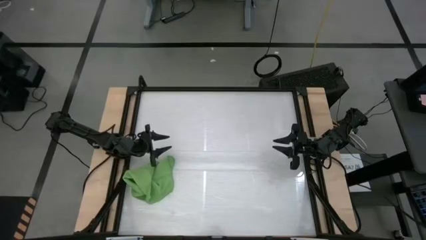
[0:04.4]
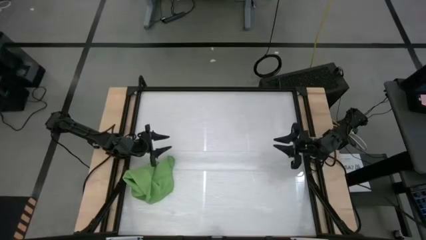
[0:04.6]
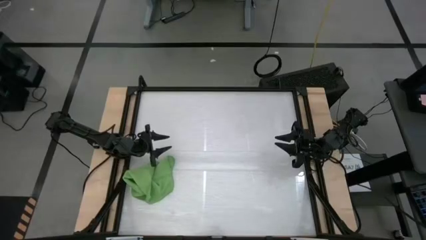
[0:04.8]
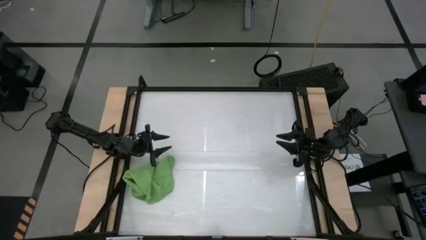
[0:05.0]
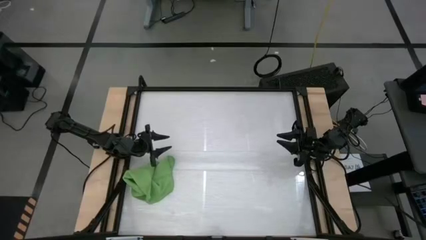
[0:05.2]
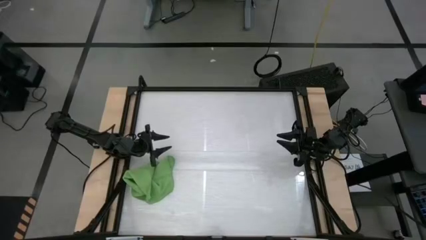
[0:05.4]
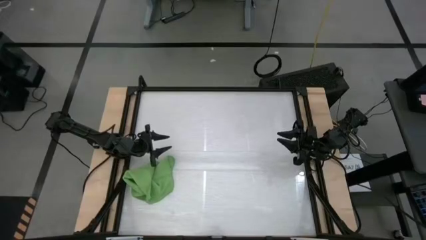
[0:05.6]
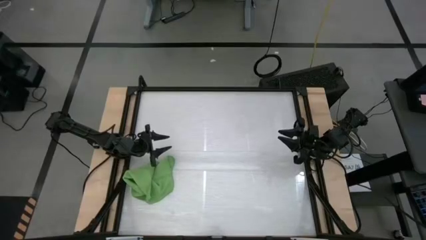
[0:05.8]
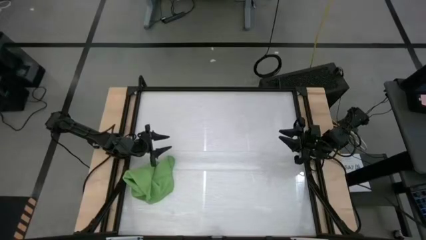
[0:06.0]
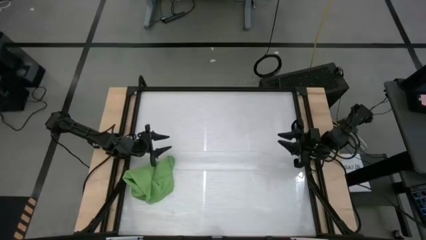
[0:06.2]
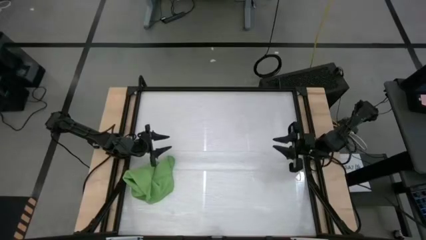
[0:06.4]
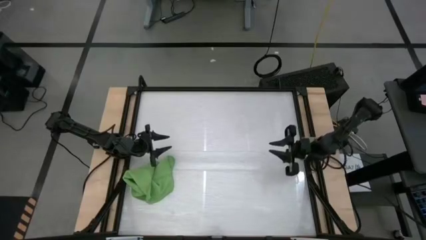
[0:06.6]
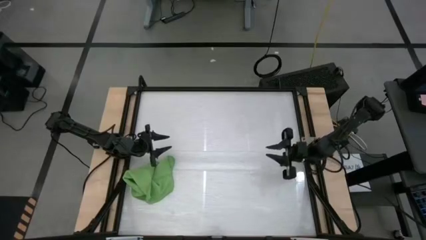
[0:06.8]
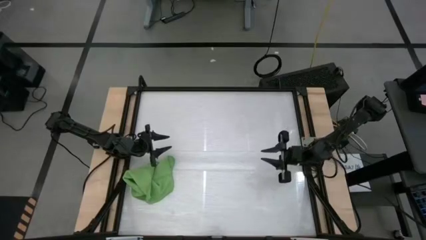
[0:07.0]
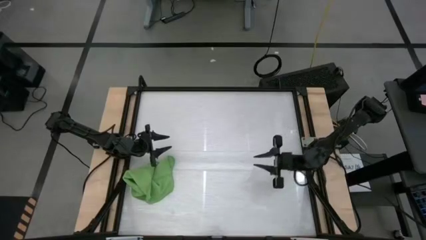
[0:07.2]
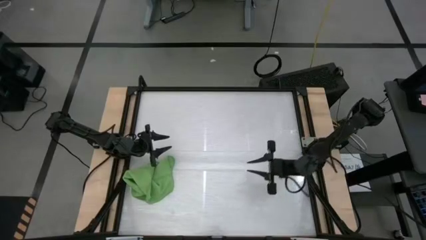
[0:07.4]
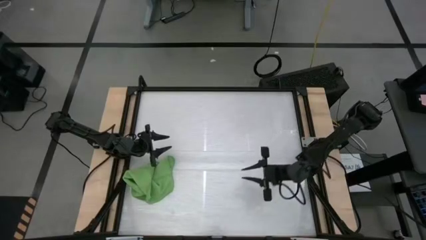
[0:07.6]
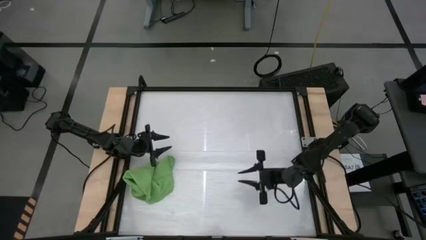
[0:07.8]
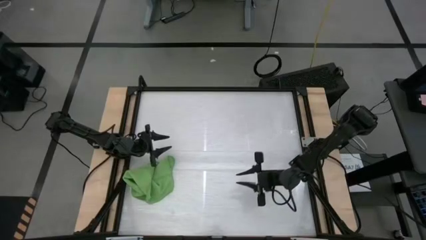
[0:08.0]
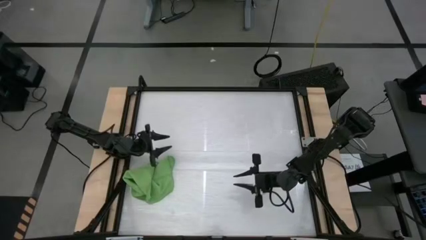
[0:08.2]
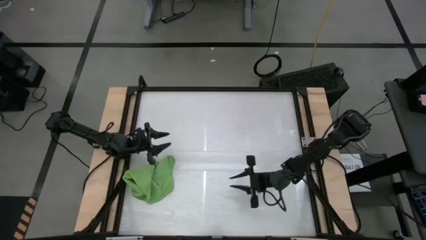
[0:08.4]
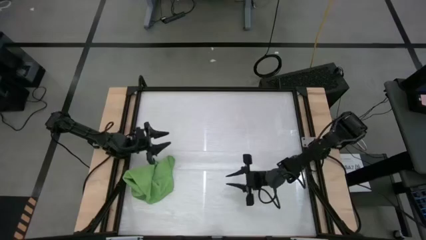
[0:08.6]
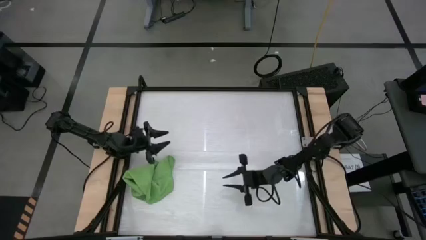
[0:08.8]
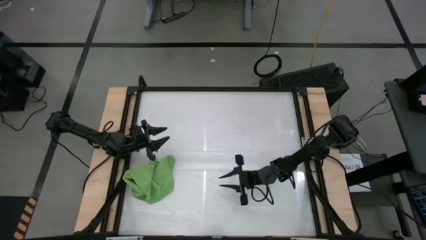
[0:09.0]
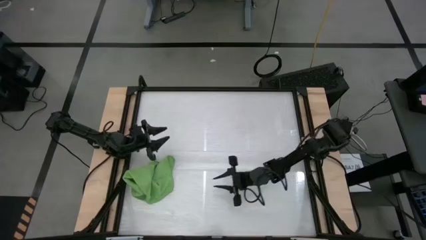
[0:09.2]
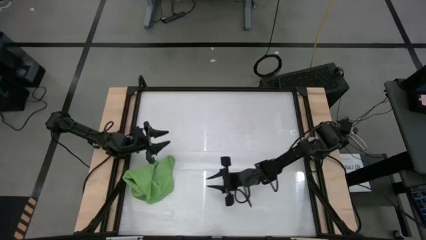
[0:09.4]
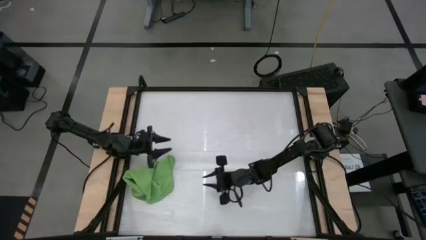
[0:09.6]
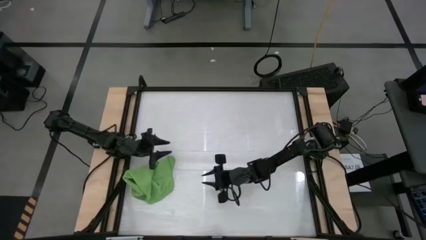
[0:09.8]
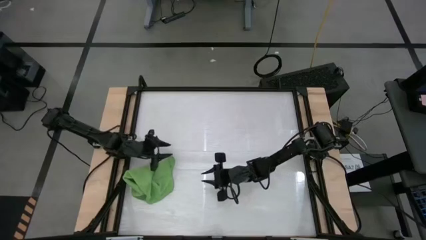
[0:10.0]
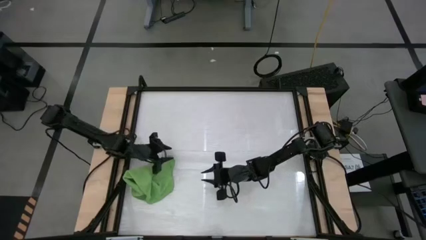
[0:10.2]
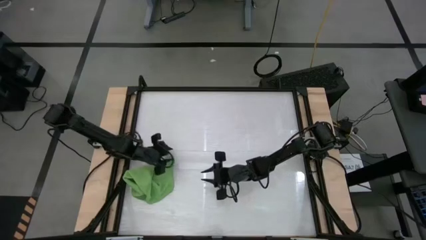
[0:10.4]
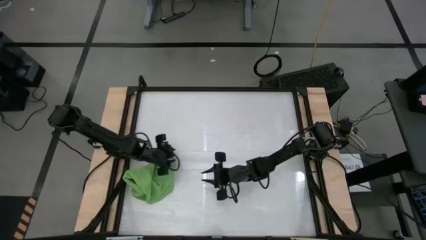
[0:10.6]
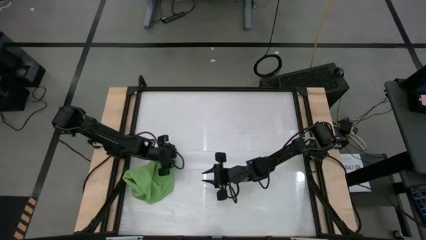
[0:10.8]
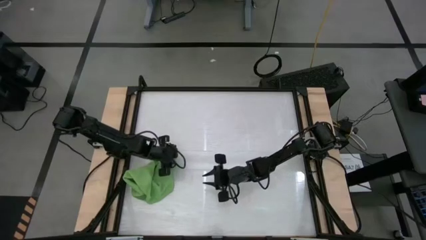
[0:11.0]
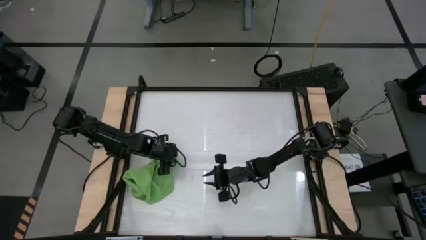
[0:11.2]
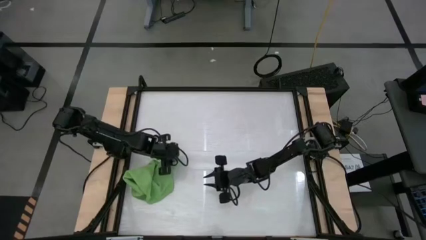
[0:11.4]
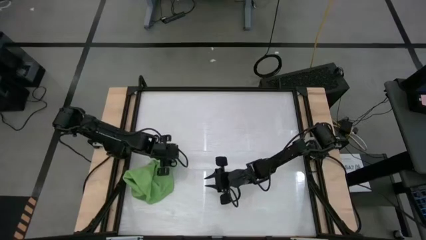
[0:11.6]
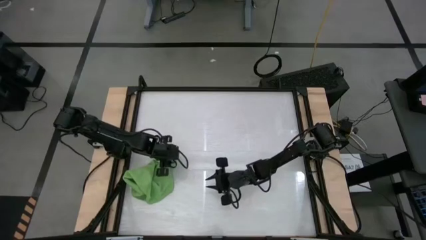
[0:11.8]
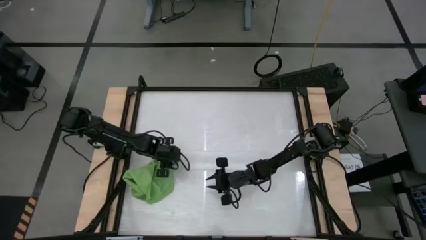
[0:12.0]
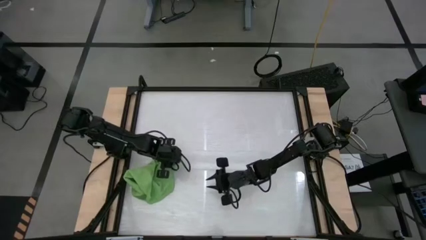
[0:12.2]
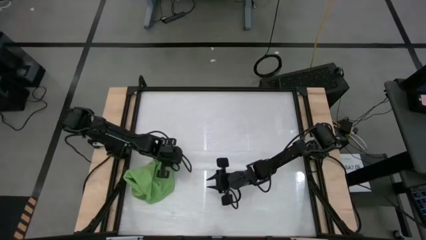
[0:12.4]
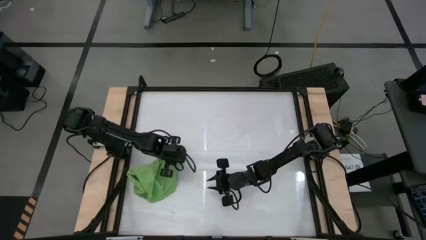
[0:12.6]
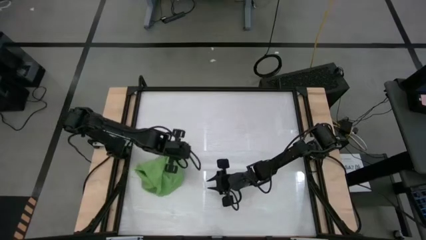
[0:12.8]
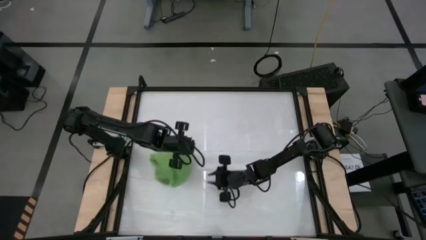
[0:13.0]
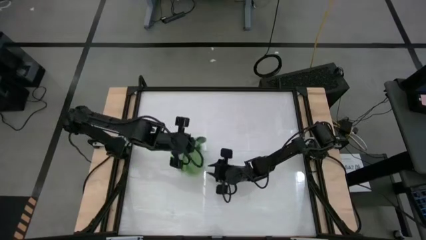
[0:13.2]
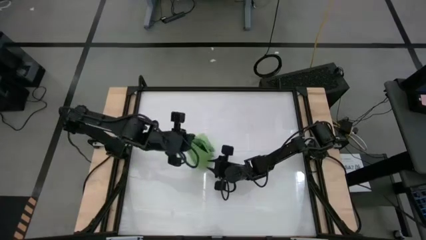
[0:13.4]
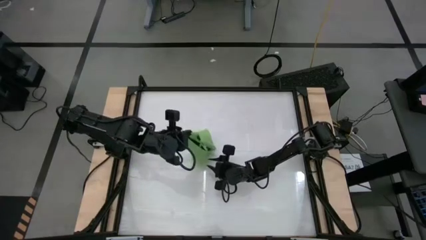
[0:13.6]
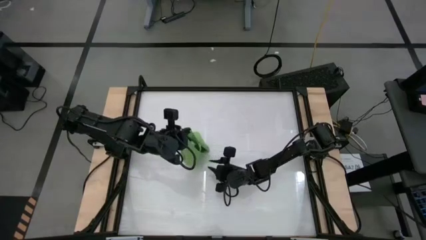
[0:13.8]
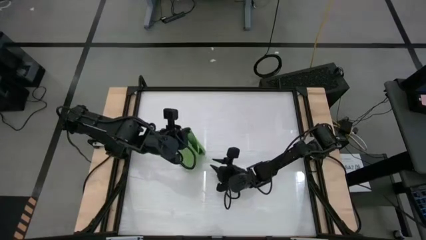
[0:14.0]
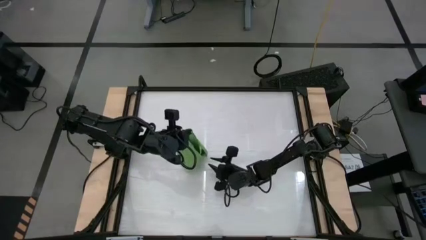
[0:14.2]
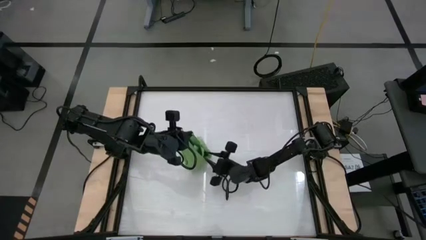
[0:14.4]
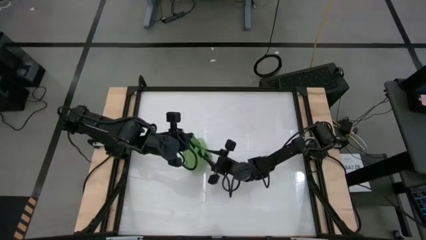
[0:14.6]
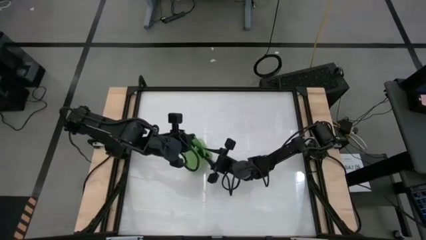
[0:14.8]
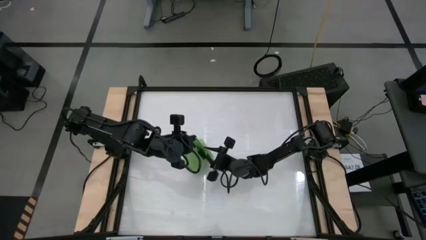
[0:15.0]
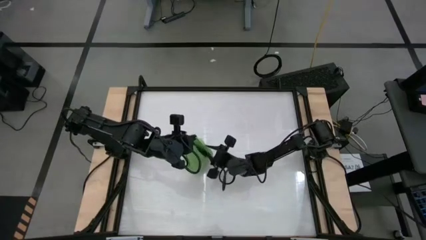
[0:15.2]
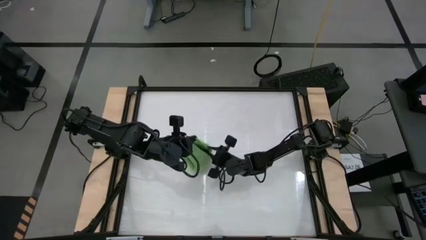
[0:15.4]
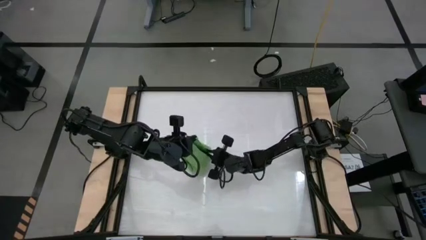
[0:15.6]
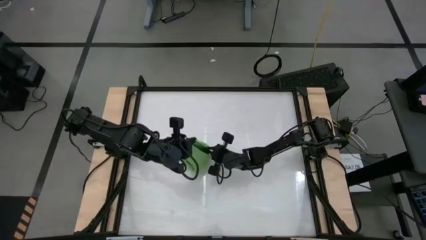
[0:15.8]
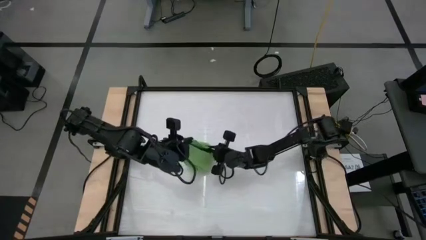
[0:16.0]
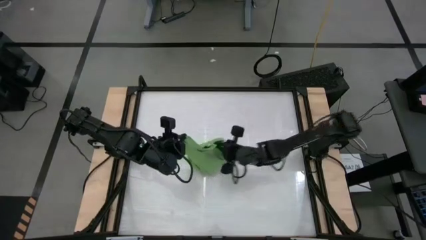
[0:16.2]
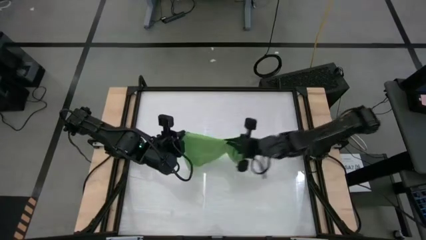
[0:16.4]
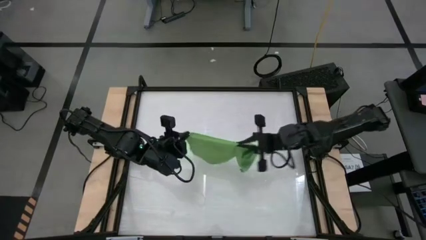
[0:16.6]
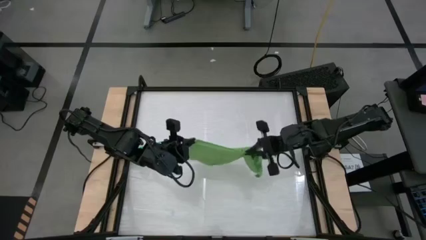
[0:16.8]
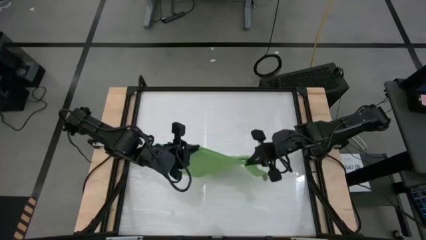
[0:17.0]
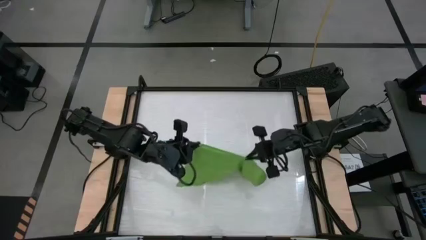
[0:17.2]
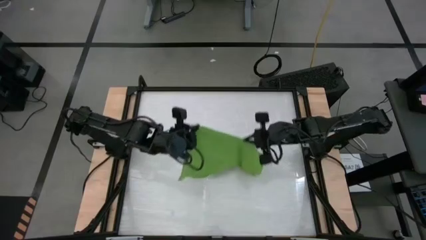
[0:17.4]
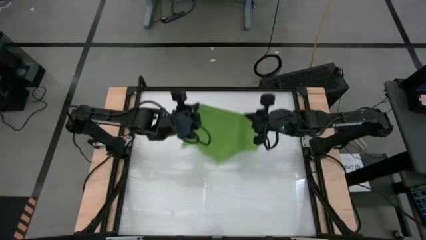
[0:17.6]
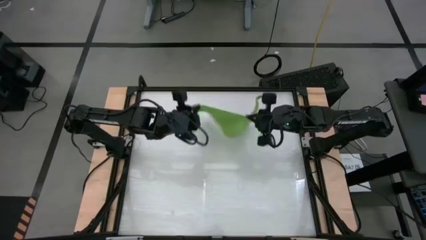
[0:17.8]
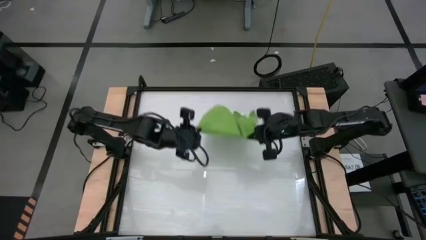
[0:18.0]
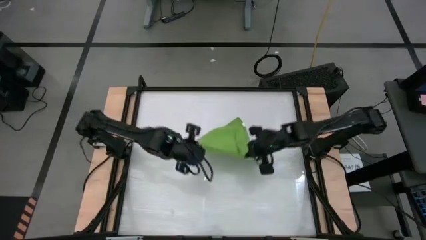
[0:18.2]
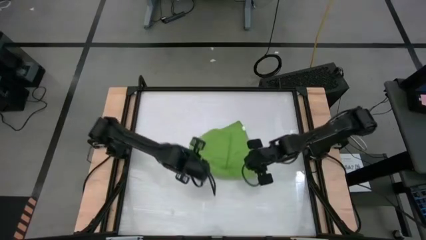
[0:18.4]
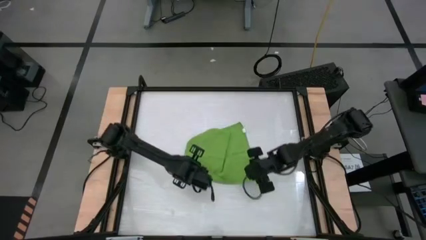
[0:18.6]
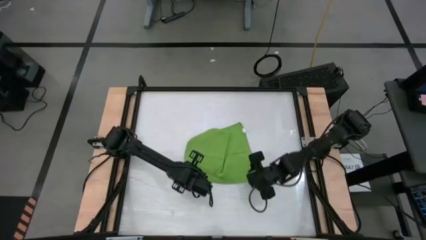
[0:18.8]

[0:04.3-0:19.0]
Task: Roll towel into tight, uniform cylinder
Fold the green microfiber towel
